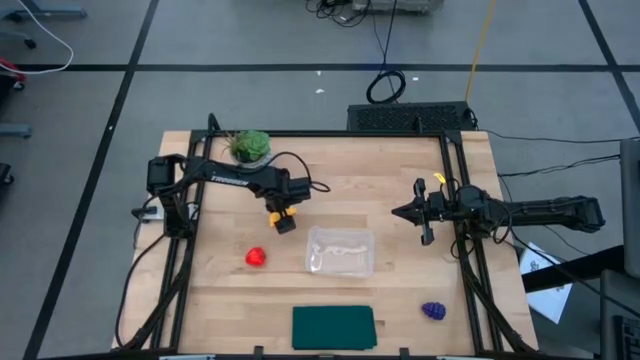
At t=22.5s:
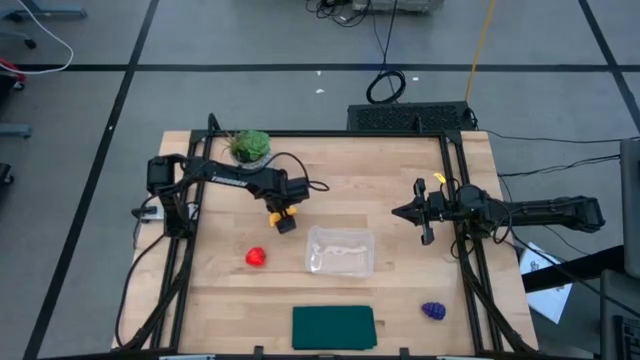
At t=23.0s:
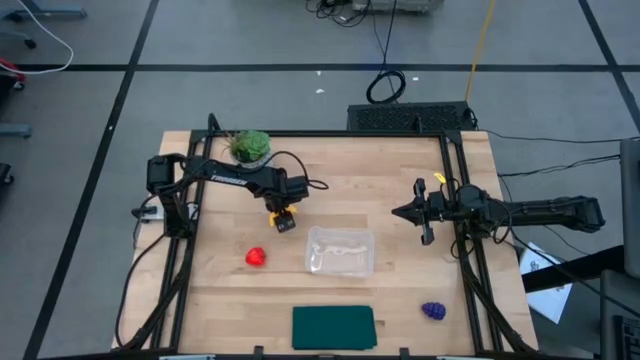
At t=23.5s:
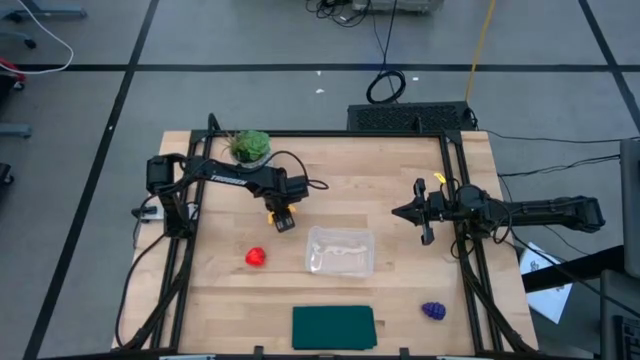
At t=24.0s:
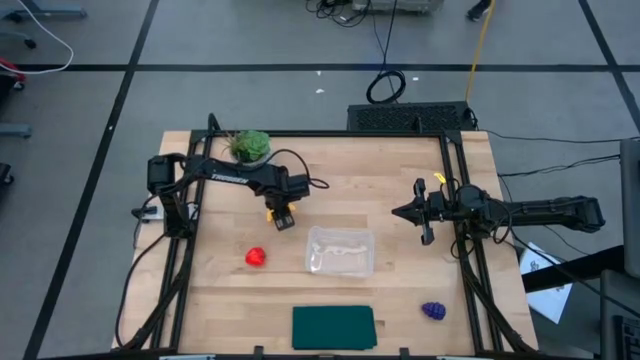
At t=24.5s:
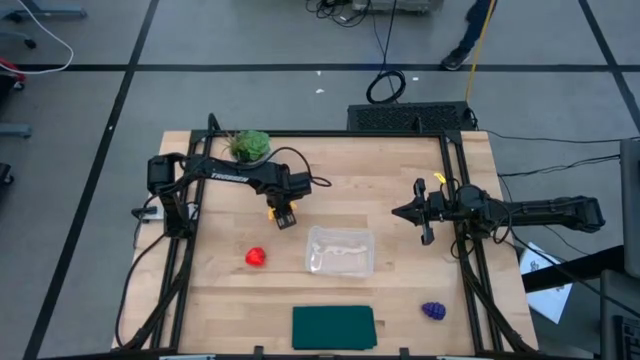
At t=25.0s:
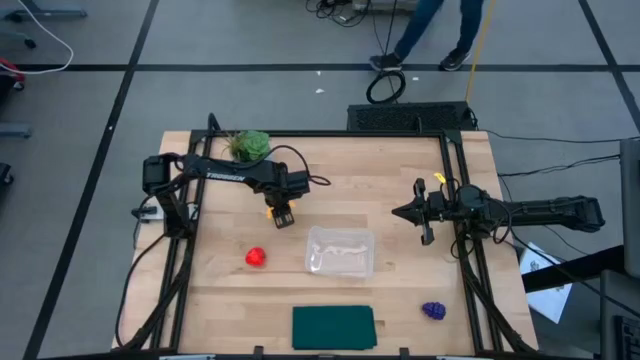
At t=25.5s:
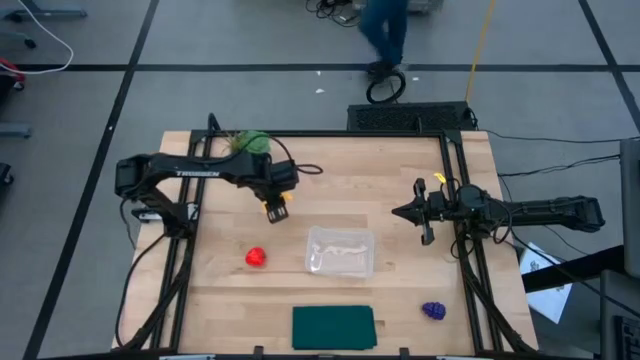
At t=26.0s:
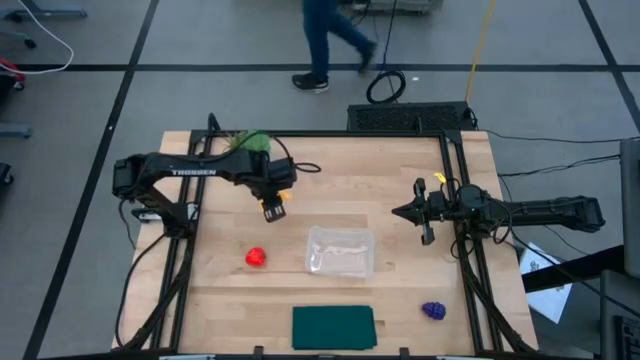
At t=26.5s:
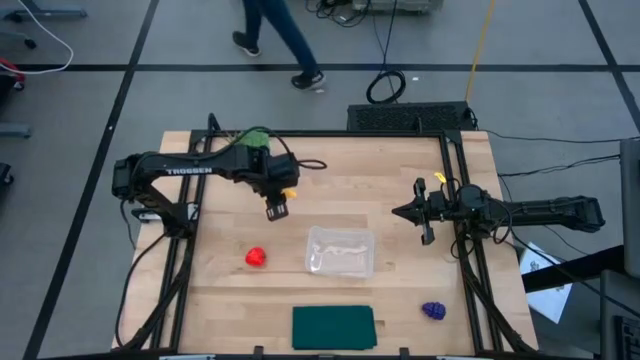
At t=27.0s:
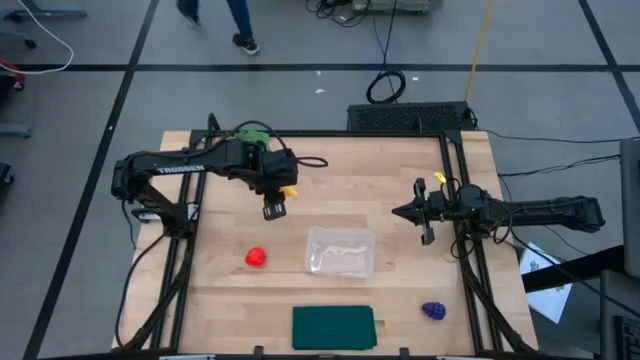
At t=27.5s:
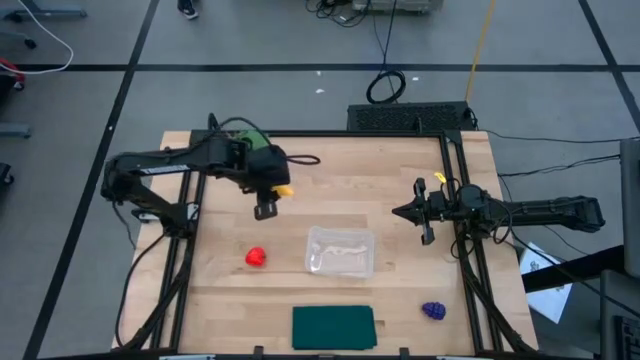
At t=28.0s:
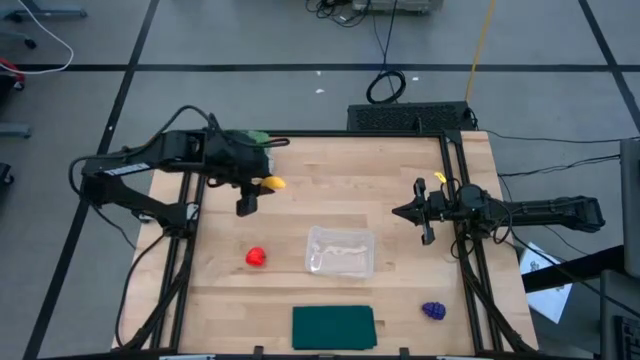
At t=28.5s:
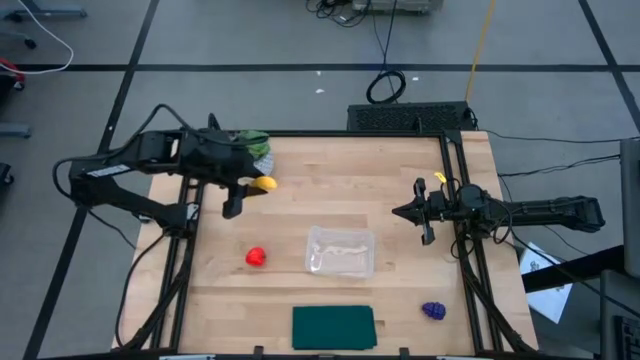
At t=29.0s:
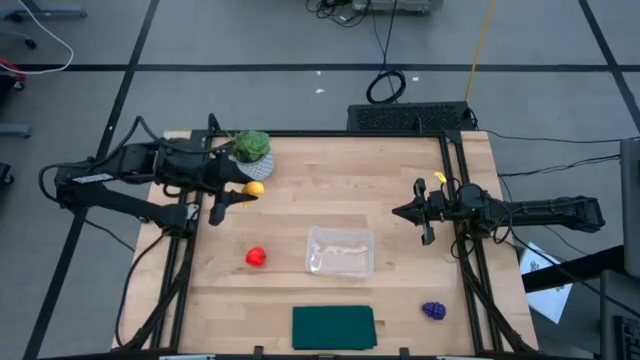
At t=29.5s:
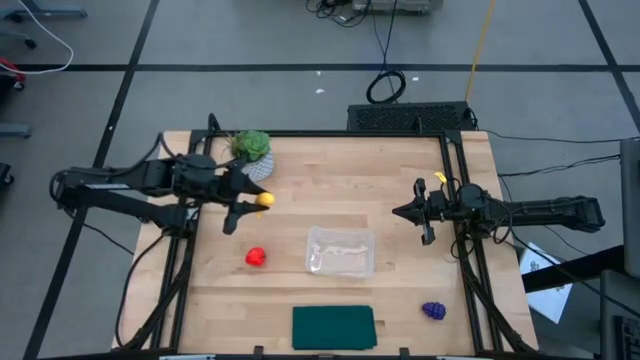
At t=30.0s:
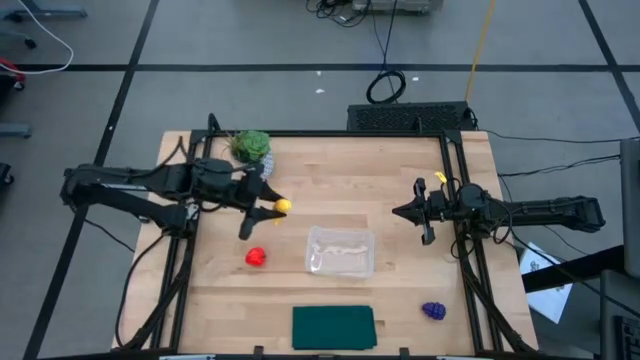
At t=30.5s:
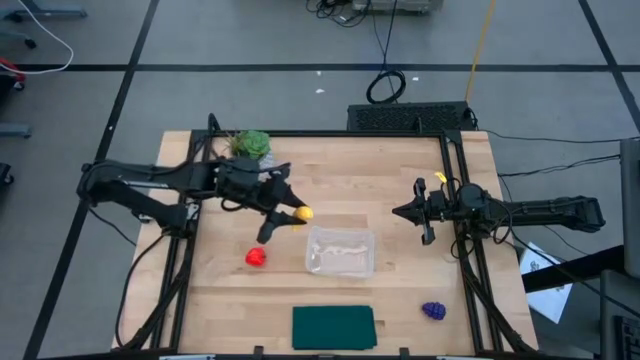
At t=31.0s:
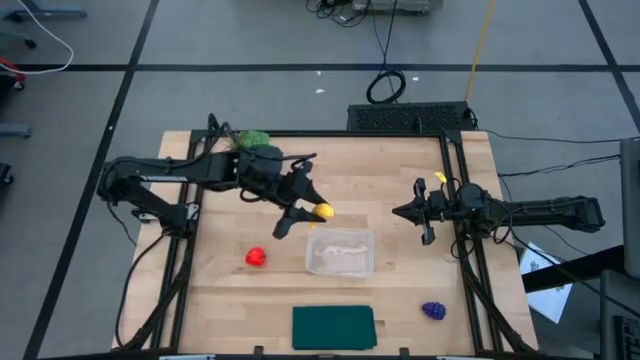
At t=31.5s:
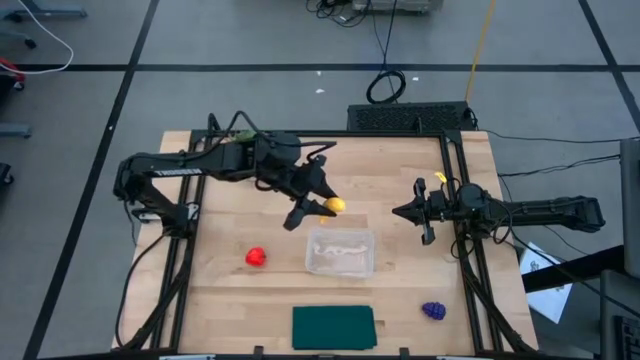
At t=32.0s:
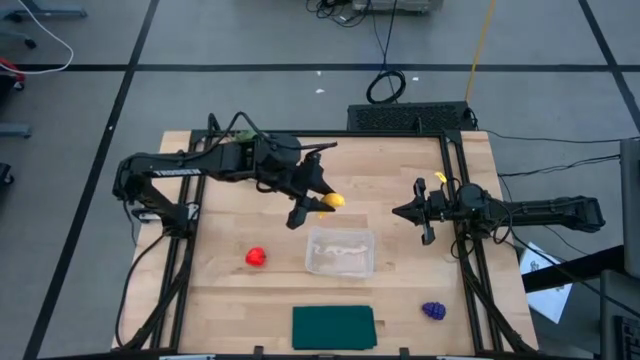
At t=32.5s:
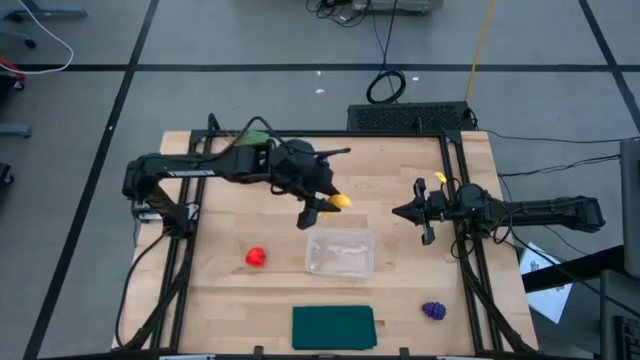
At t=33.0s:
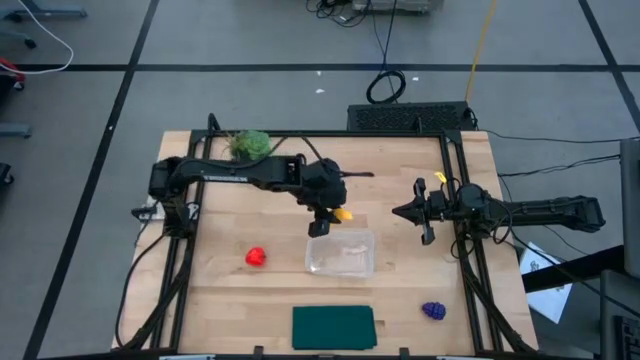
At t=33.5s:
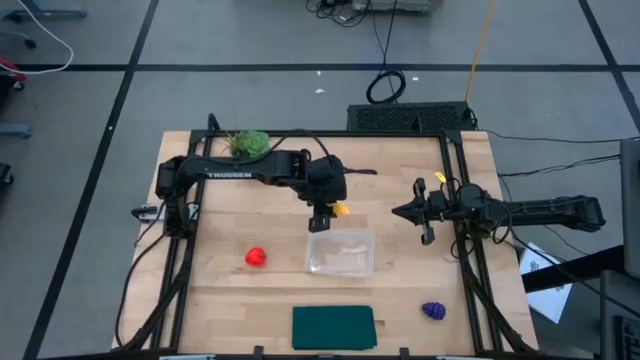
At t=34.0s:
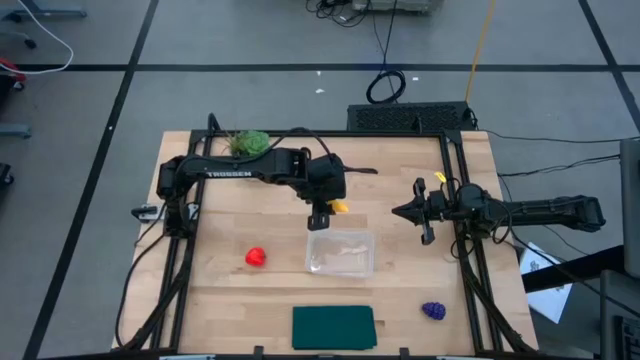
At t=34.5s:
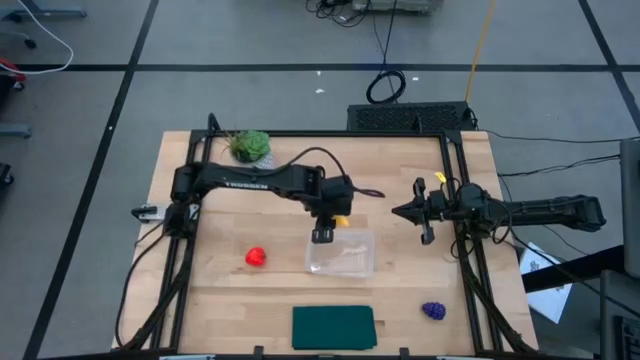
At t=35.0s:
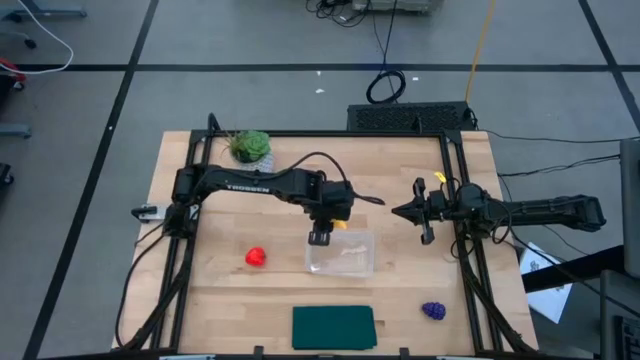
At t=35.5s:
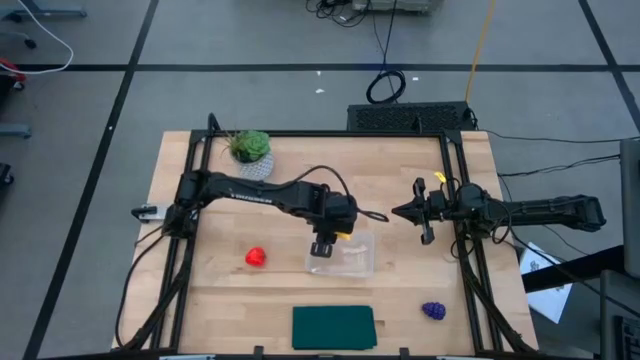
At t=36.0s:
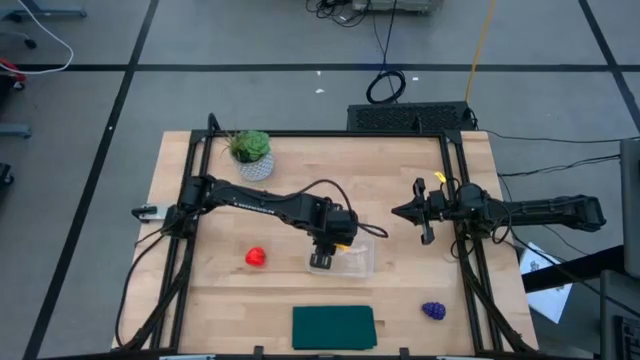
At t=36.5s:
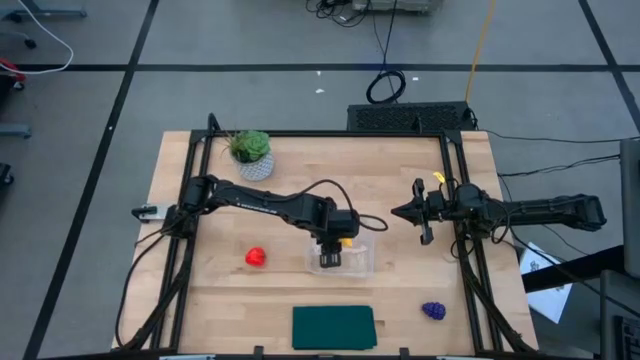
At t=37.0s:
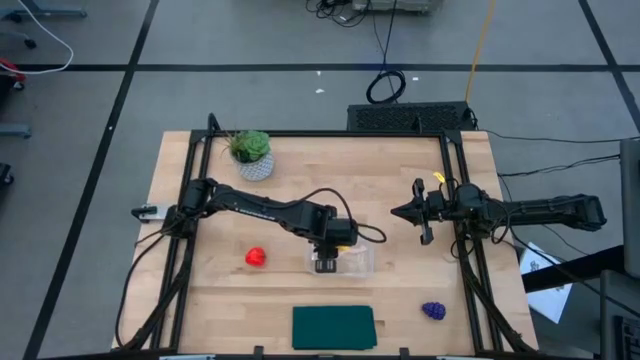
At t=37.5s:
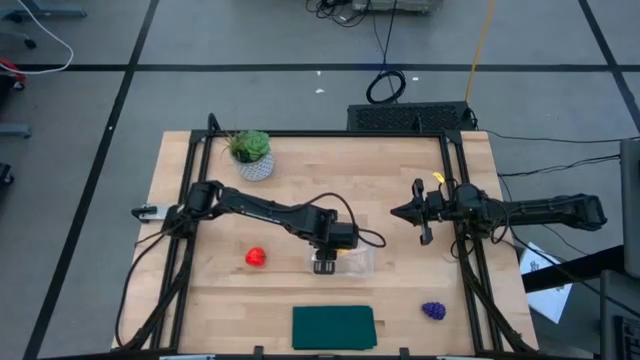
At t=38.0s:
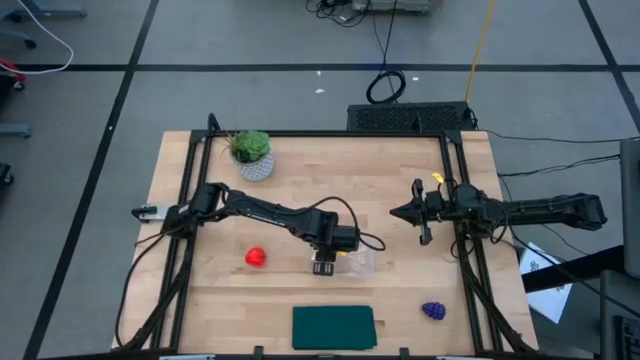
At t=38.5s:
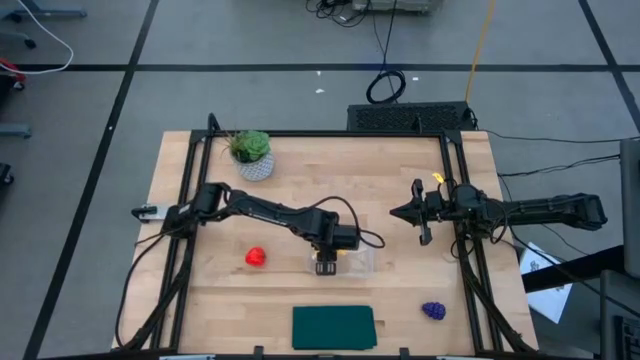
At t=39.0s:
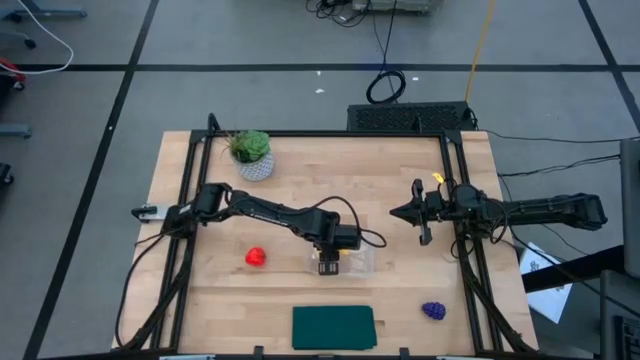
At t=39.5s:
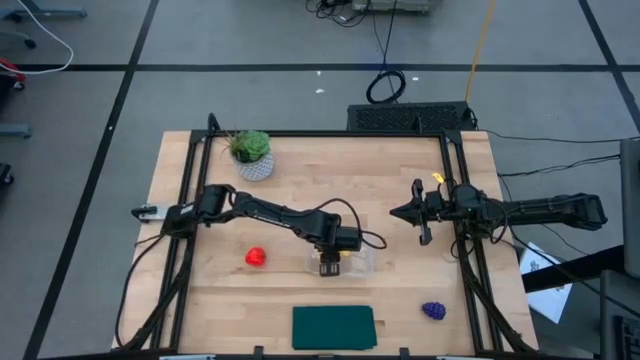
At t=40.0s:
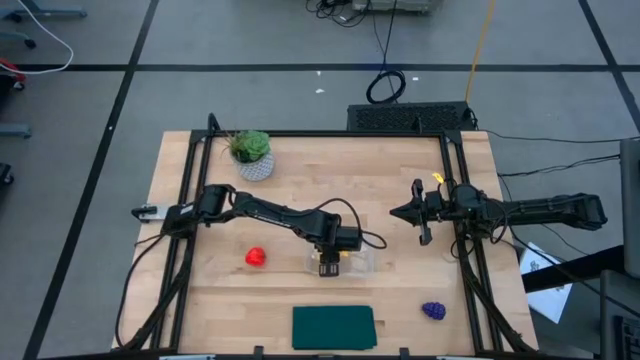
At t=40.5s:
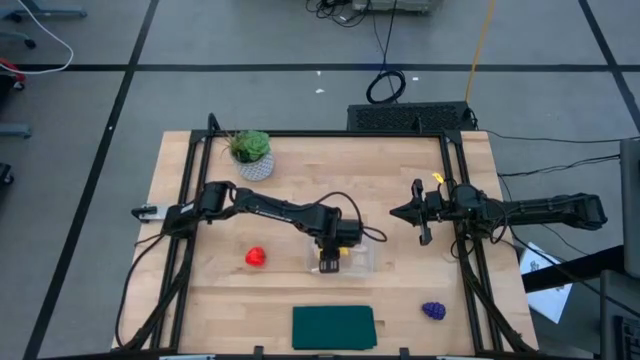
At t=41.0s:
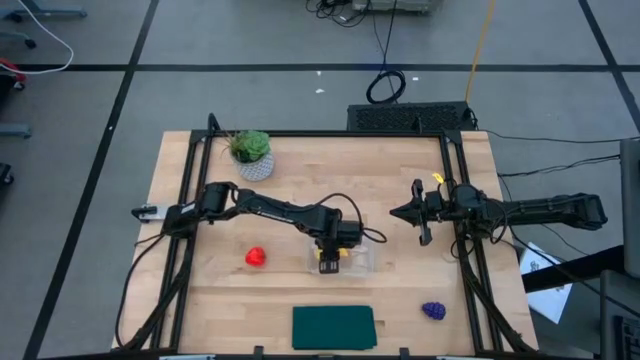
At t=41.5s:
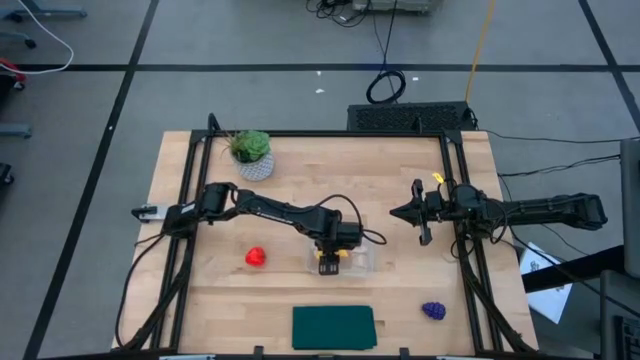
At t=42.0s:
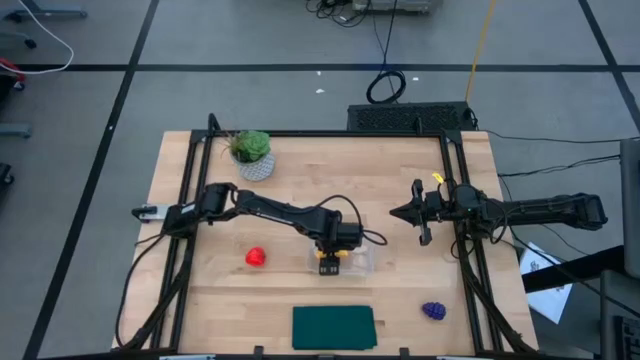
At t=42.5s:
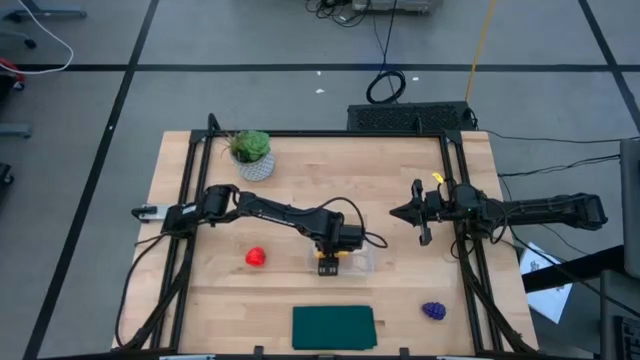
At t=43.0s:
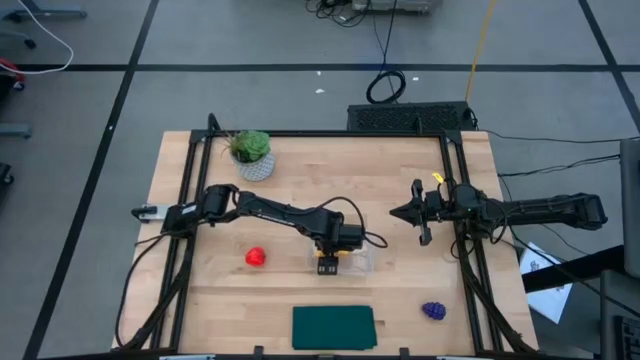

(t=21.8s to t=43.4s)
Task: Pick and placing Produce into tupperware
Put the banana into the transparent bin
